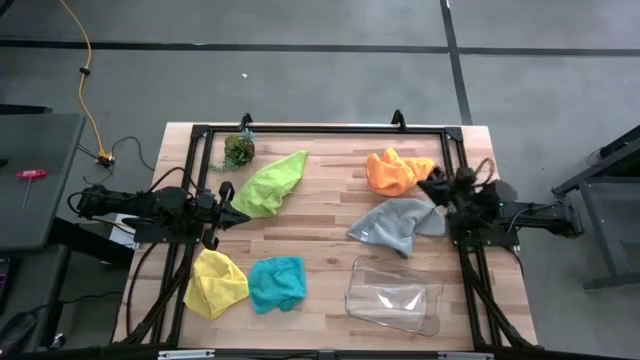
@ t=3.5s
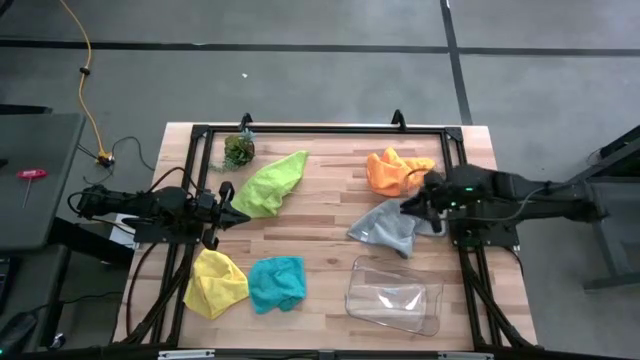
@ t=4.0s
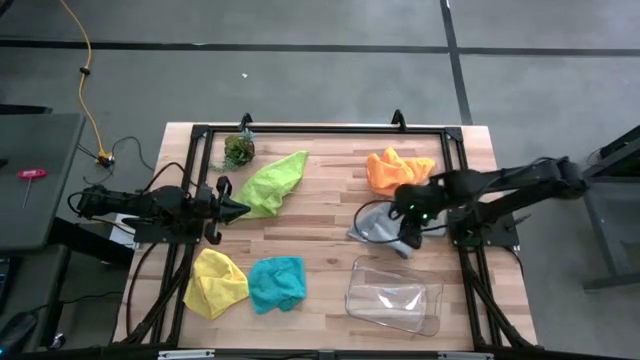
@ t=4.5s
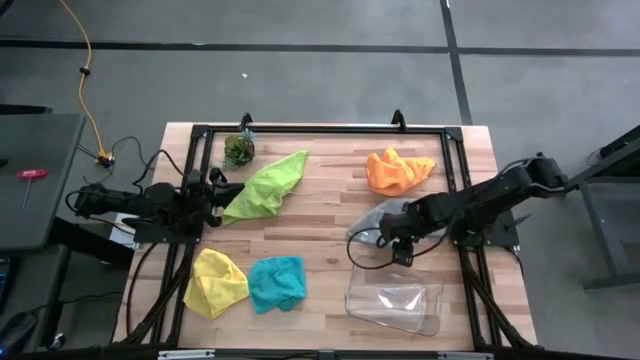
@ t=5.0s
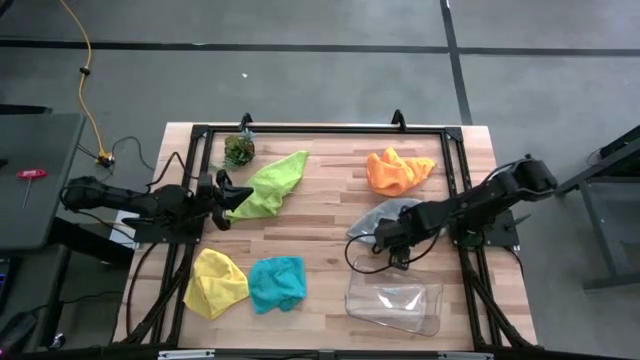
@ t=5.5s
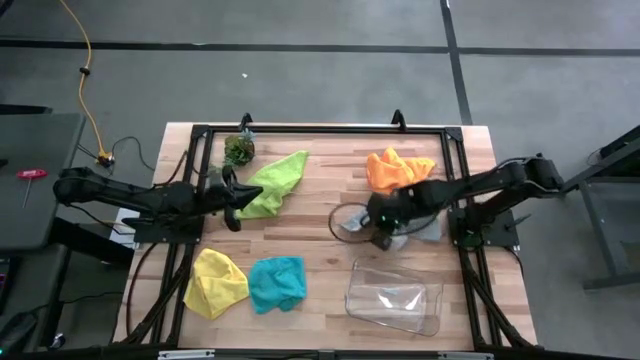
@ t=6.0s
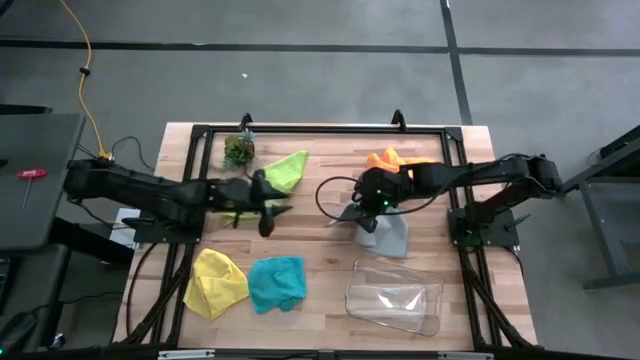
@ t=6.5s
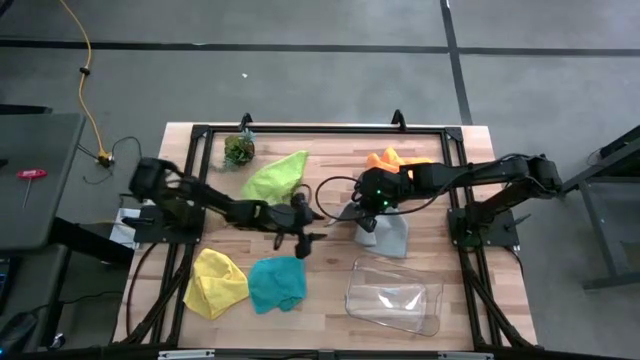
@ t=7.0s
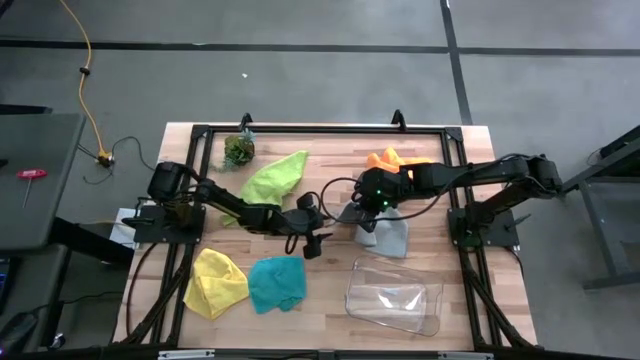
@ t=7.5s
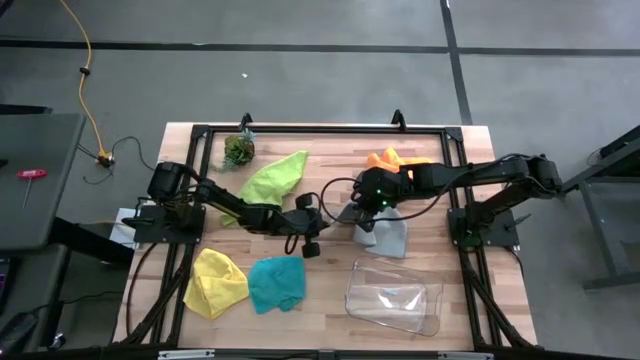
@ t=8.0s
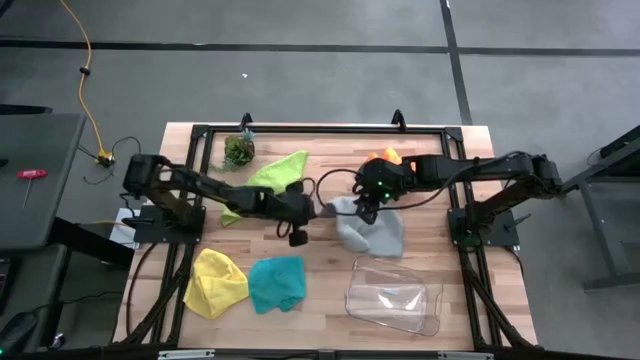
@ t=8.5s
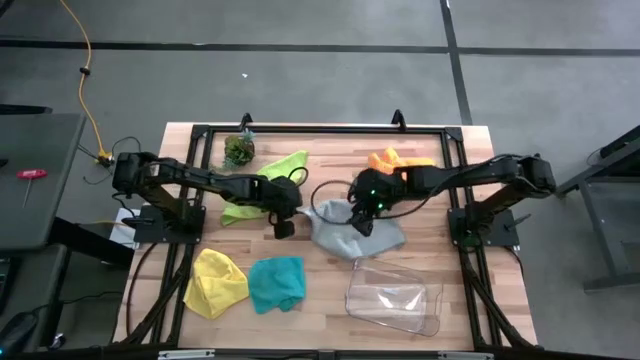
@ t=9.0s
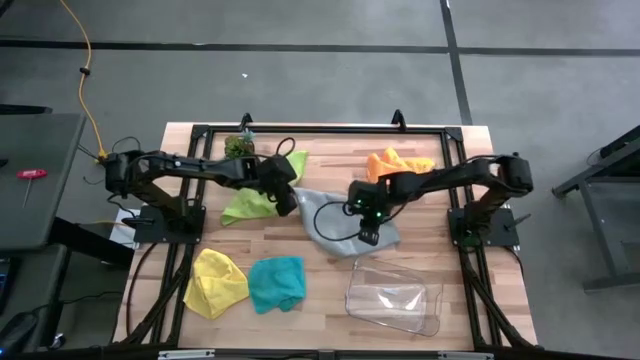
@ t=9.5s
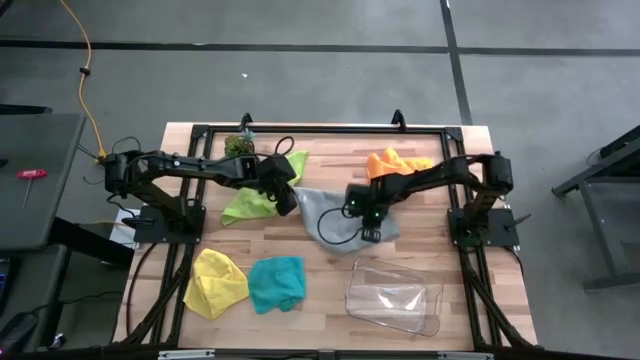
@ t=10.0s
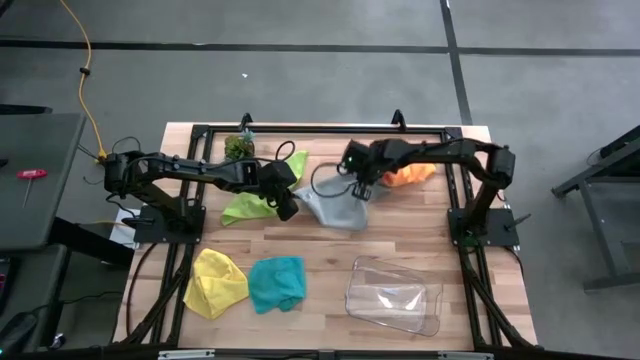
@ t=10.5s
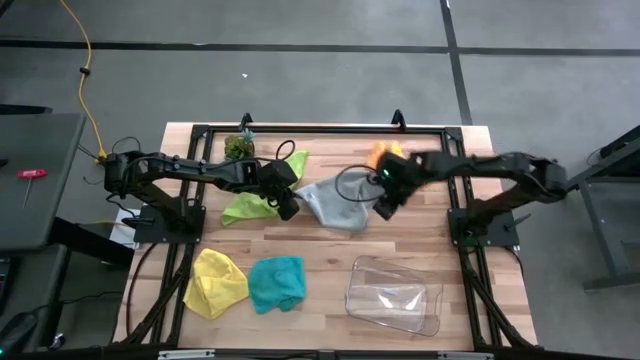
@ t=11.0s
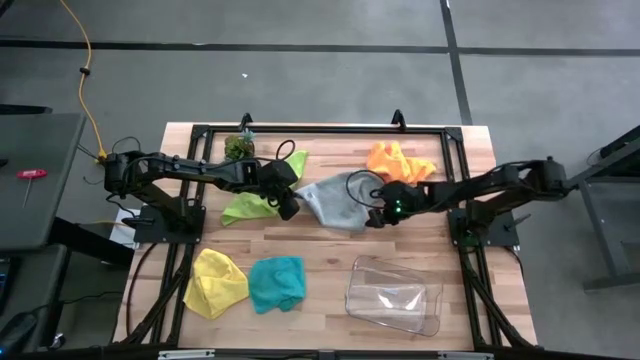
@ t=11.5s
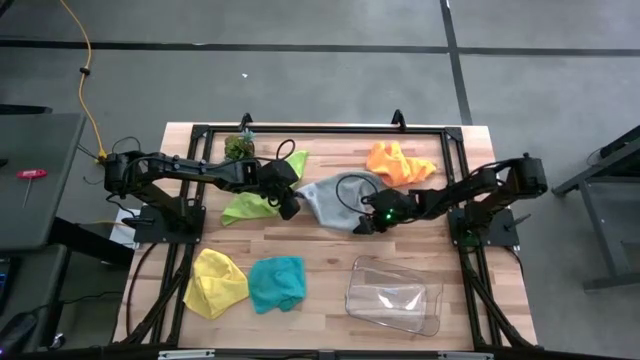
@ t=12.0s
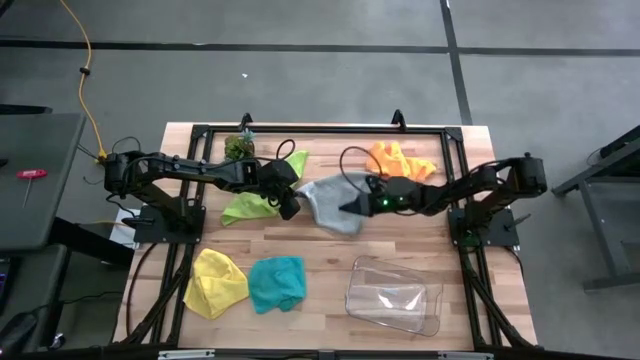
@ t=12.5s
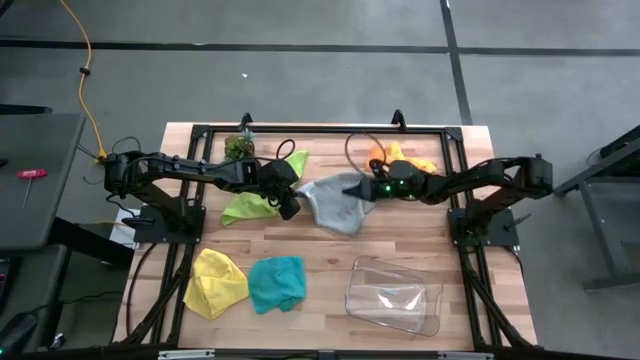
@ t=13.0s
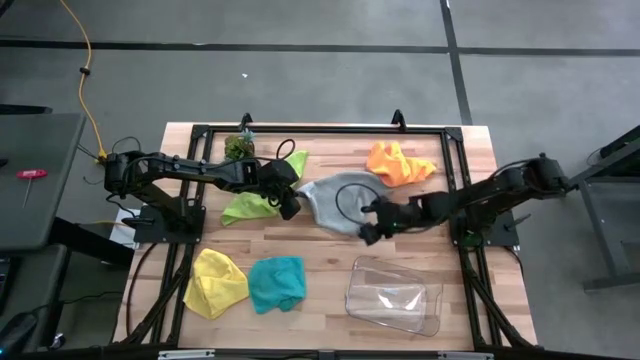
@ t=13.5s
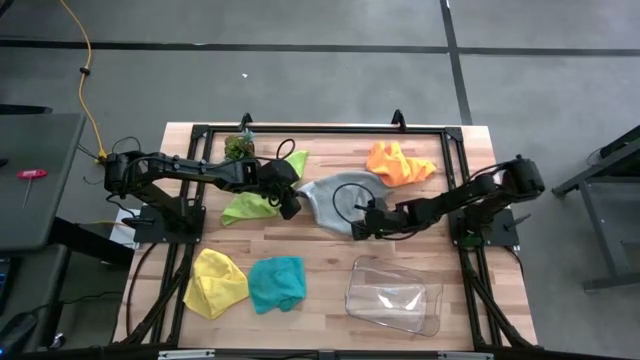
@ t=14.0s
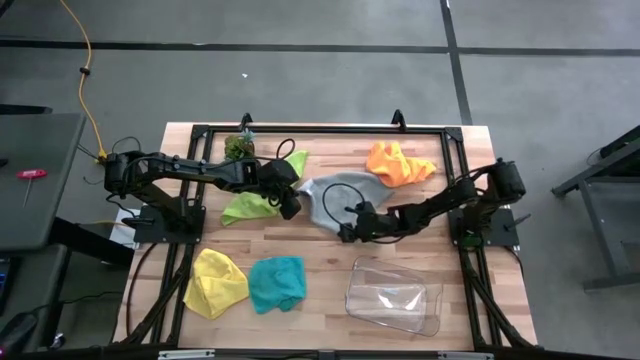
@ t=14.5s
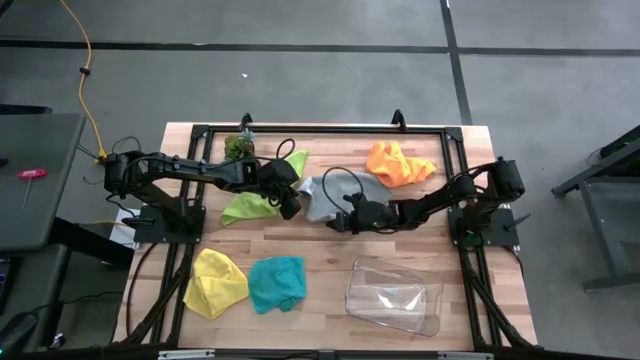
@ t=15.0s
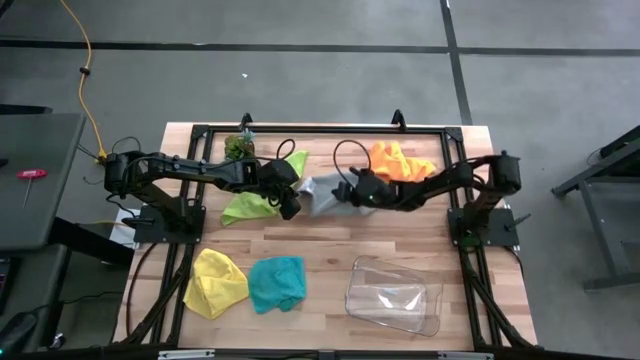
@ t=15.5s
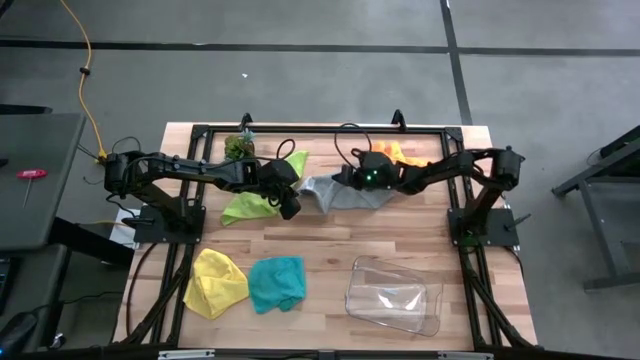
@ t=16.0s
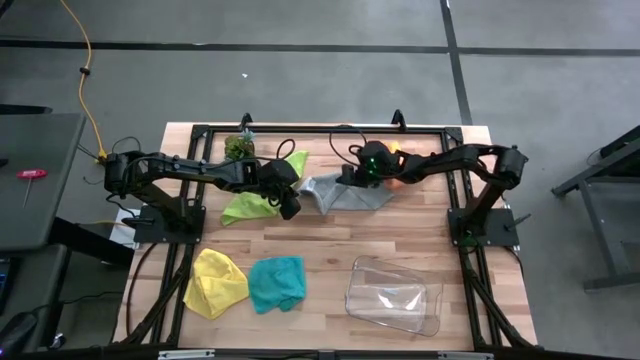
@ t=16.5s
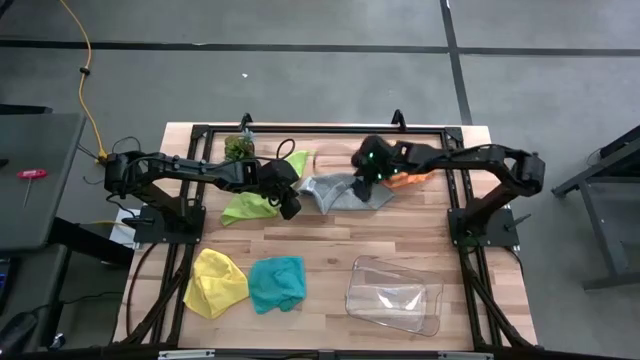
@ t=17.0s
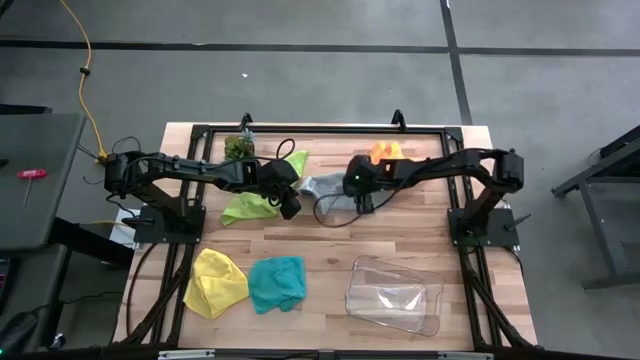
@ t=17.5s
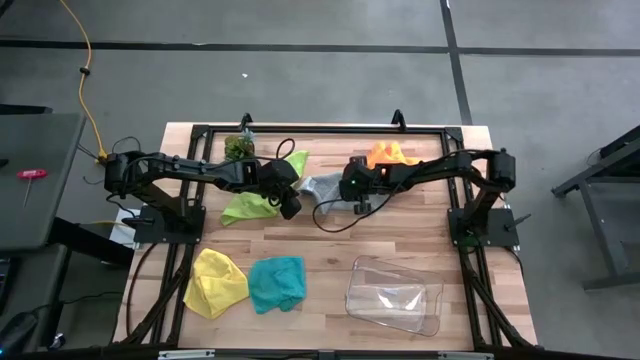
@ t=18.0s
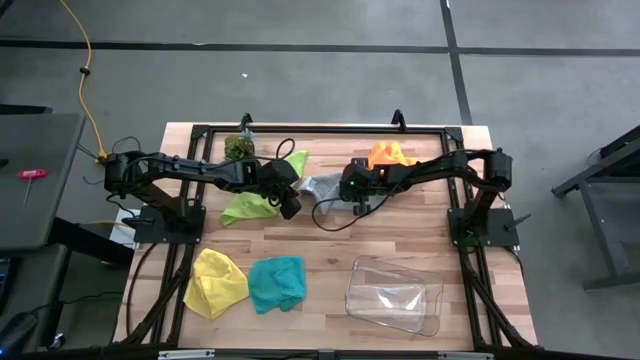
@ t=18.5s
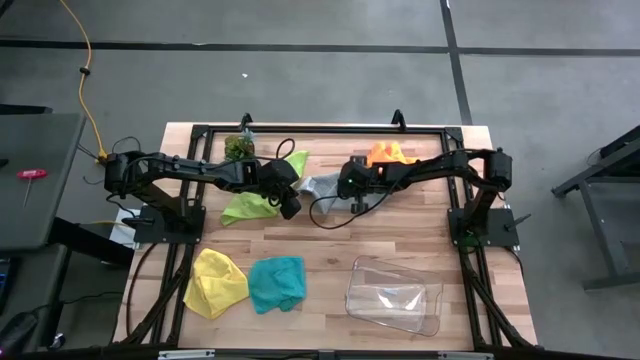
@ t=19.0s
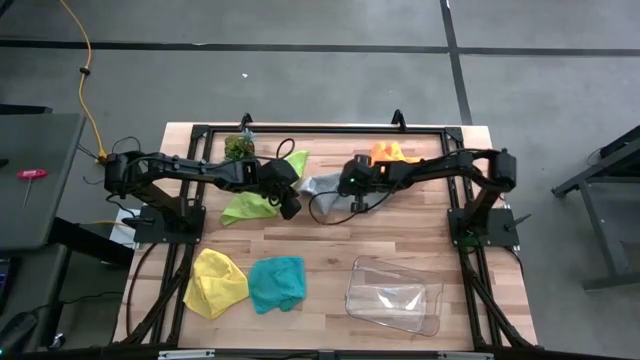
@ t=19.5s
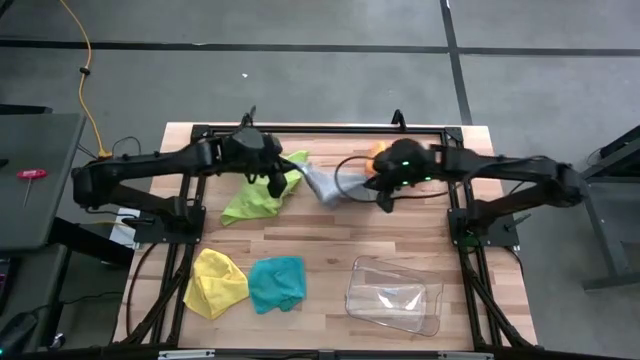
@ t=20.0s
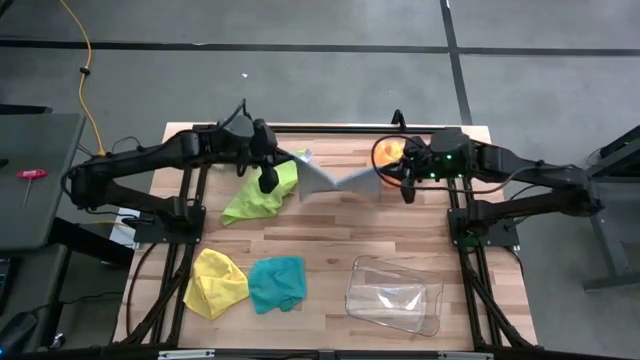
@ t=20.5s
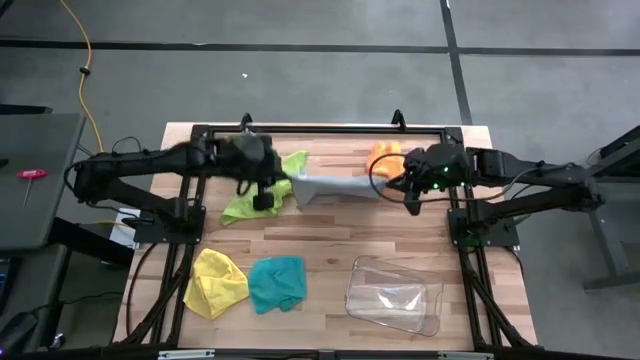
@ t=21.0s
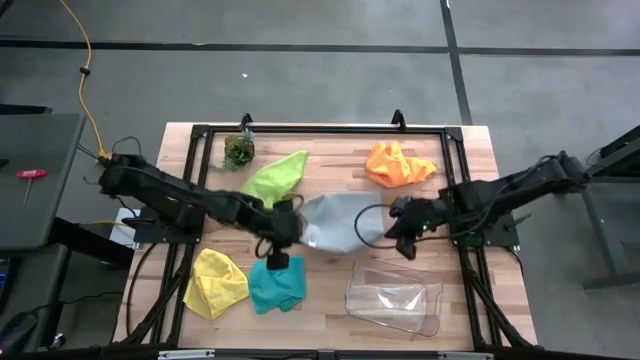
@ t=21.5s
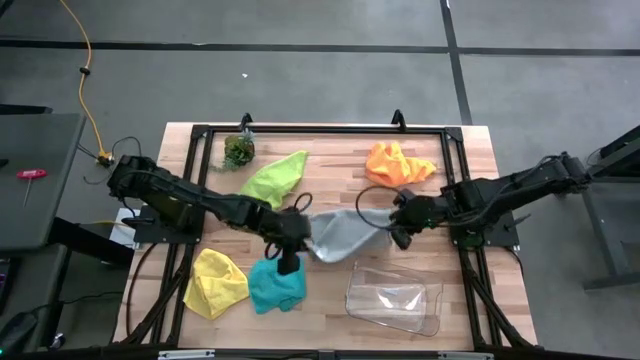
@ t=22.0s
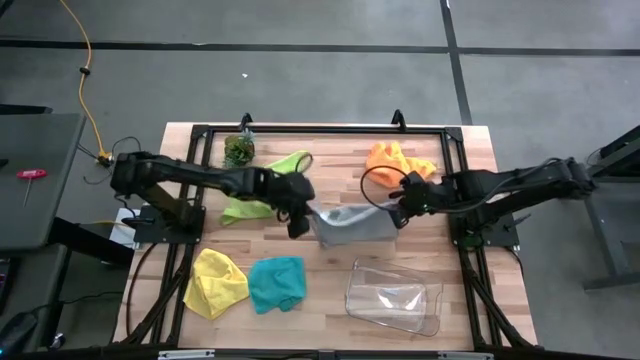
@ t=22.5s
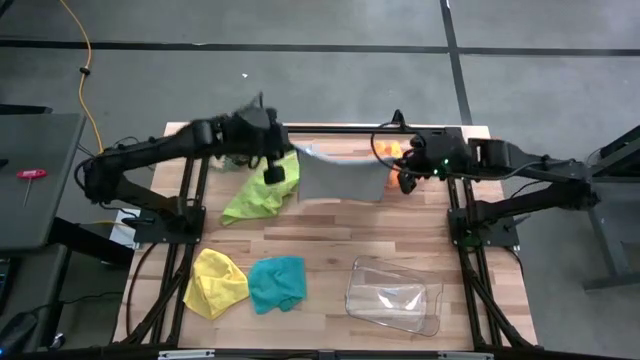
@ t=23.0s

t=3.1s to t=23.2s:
Task: Fold microfiber towels
Fold the gray cloth

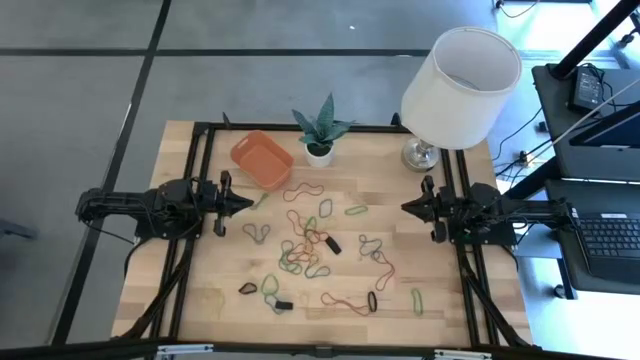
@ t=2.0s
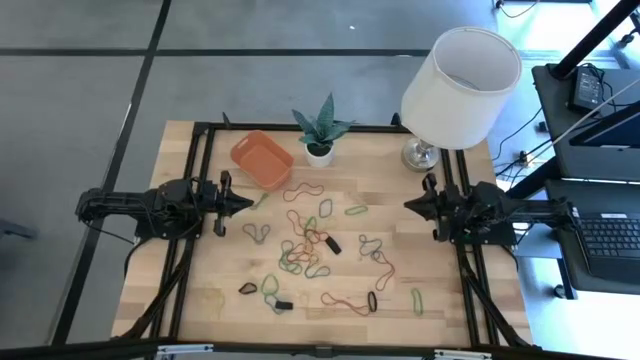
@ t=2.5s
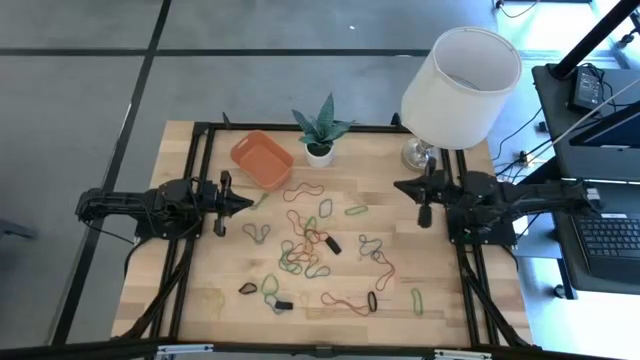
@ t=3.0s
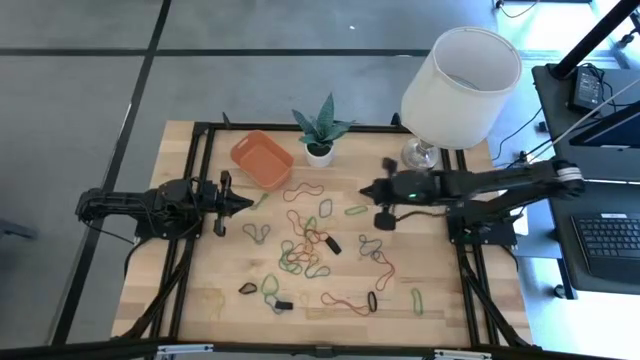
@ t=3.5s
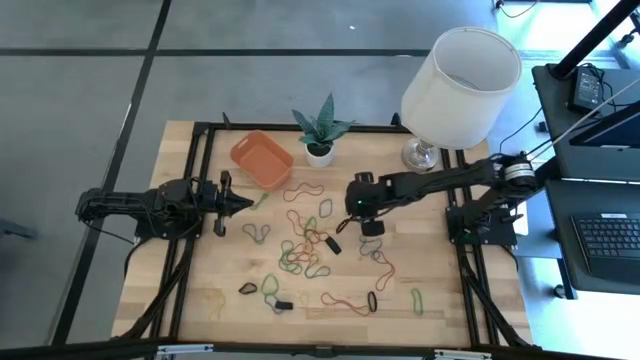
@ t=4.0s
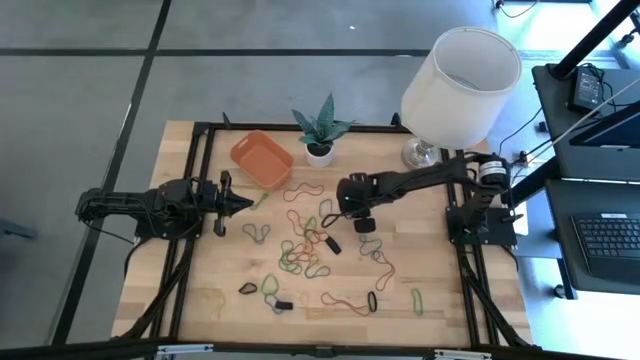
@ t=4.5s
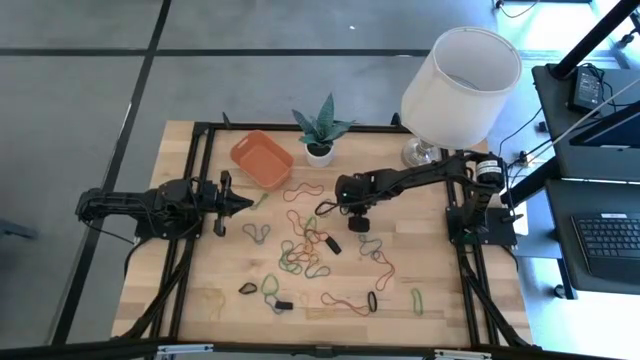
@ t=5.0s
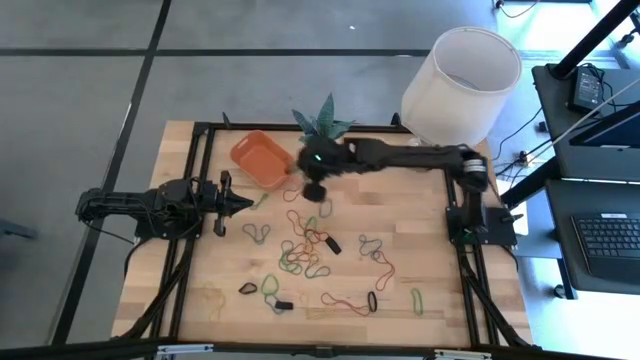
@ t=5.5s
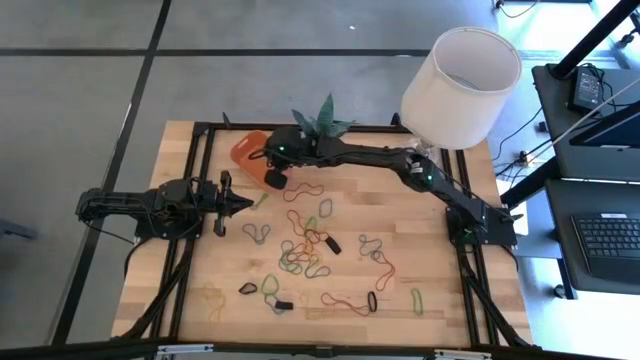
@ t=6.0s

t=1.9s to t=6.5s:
Task: Pick and place rubber bands into bin
Put the green rubber band into the orange bin
